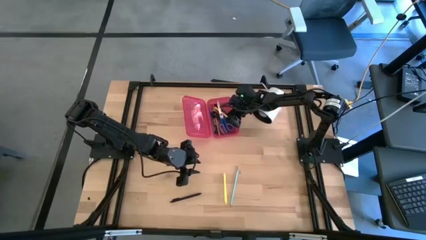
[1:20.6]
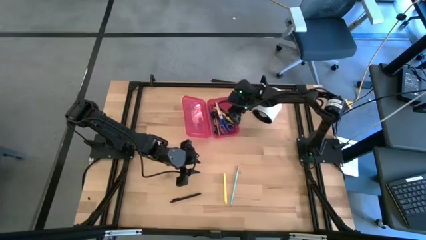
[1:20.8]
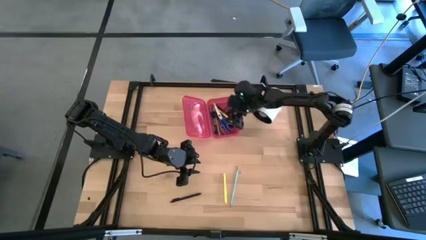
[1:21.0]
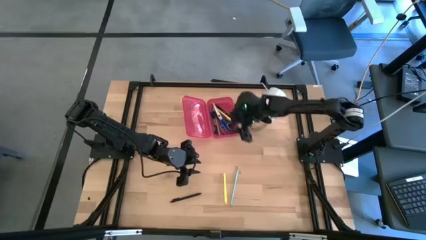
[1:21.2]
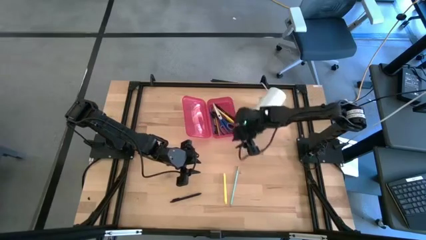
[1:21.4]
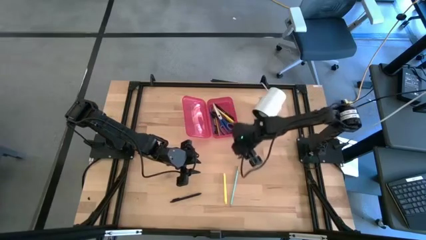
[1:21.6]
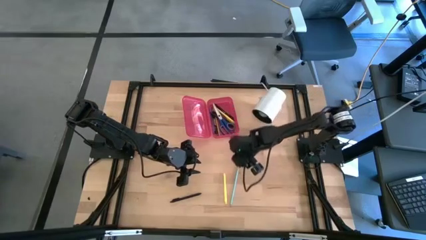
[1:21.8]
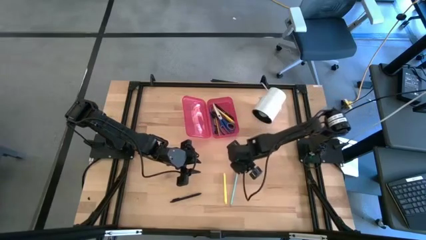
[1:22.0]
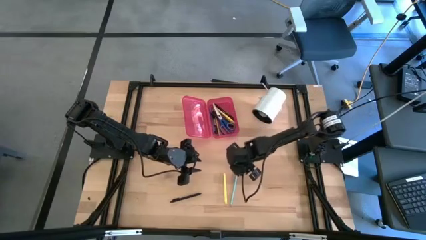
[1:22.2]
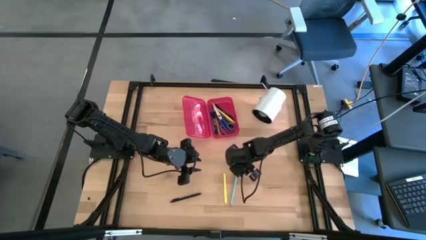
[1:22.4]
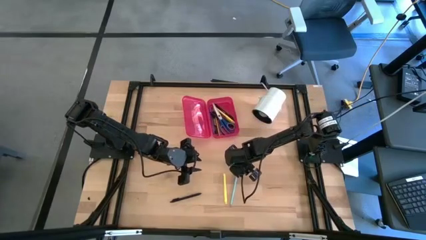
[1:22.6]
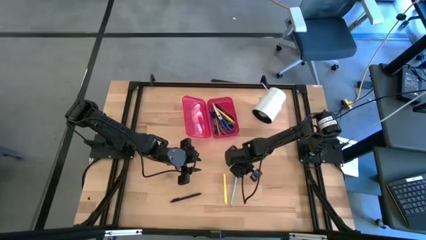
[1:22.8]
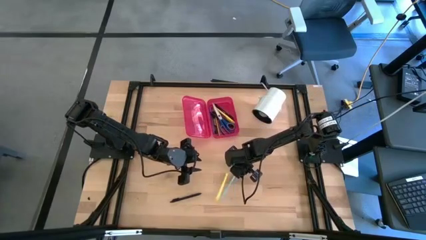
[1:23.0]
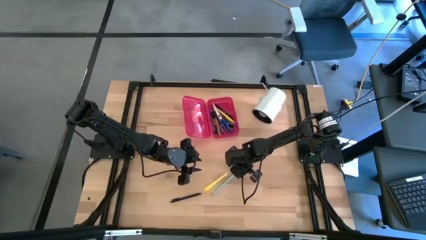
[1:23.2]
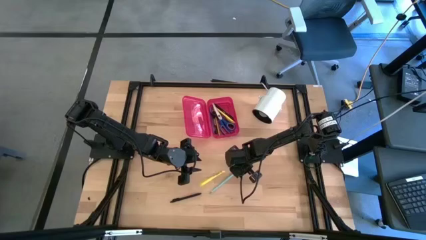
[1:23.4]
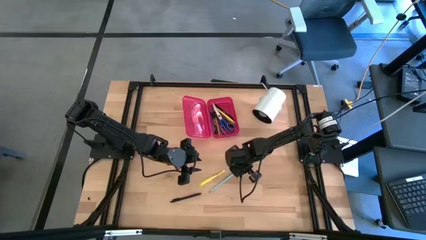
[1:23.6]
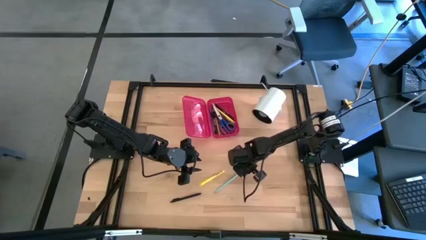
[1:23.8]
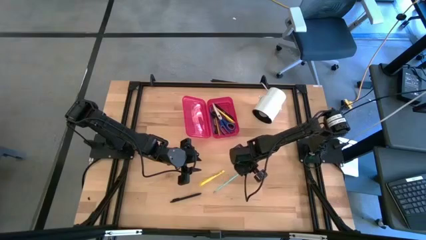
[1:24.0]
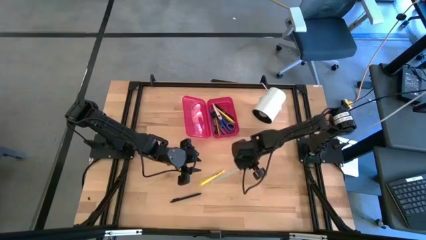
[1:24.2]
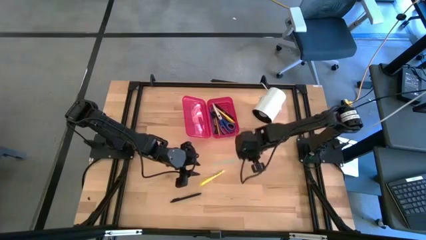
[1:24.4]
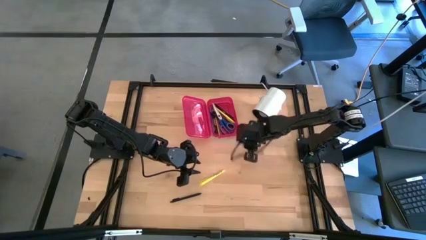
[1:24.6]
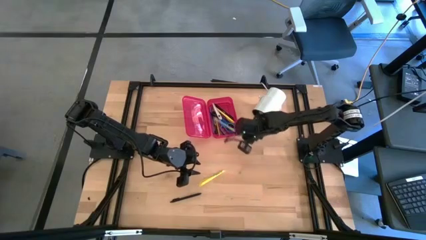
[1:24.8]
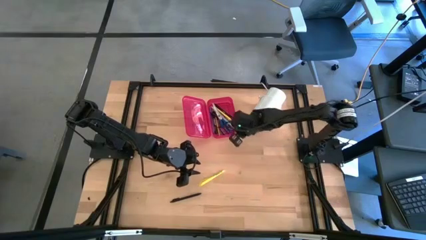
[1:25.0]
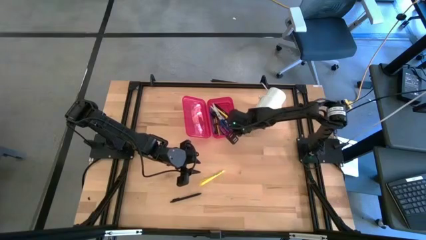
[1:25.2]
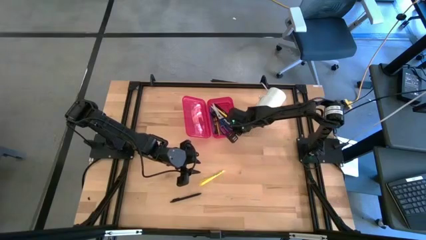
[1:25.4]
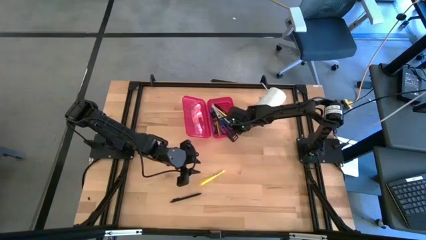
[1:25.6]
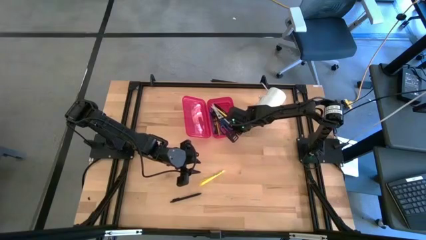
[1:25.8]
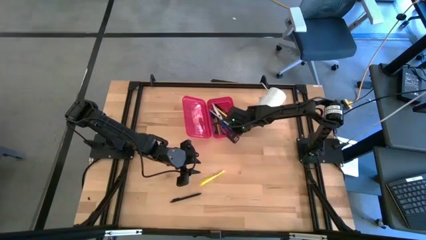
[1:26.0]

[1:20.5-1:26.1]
Task: Pick & place school supplies into a supply box
Put the blue pencil into the red supply box

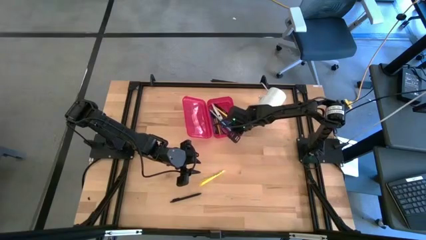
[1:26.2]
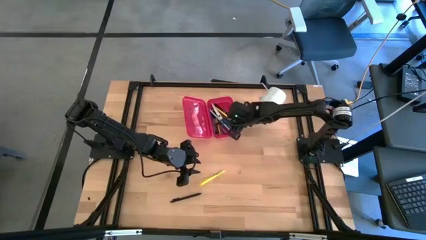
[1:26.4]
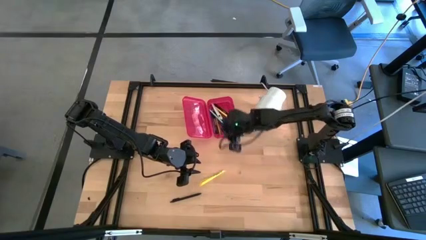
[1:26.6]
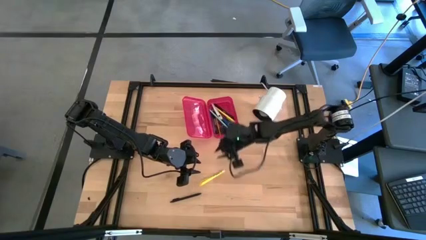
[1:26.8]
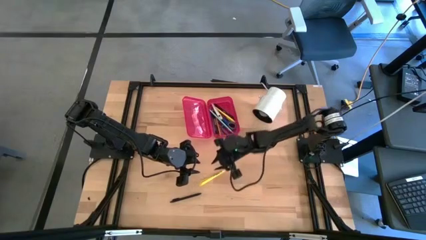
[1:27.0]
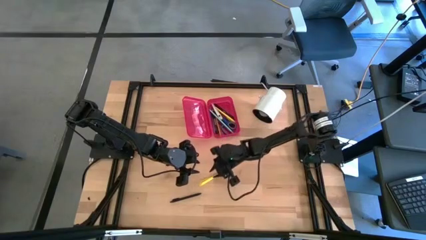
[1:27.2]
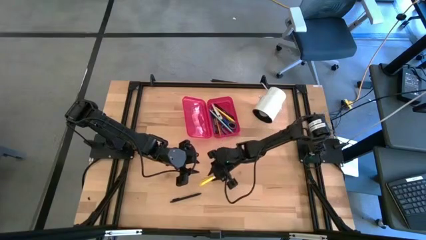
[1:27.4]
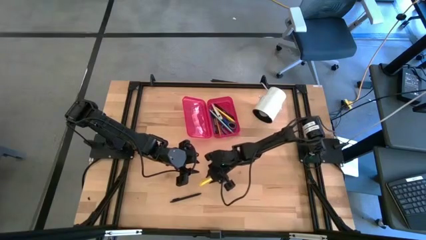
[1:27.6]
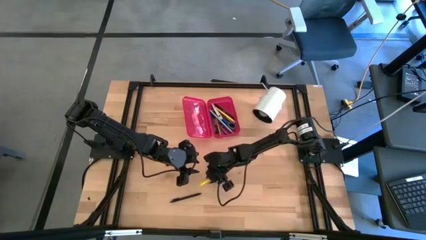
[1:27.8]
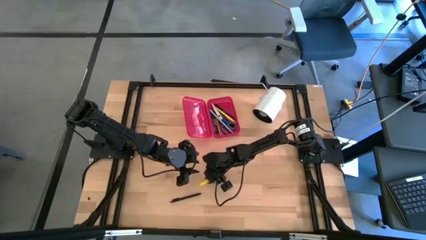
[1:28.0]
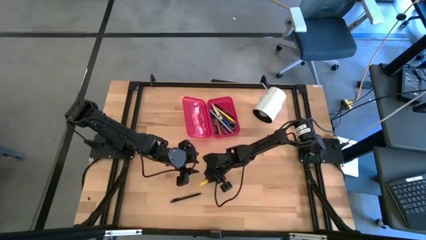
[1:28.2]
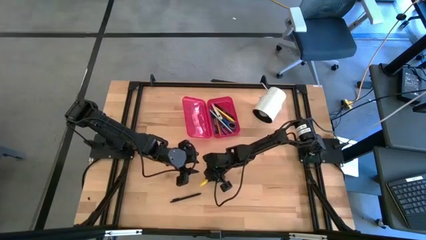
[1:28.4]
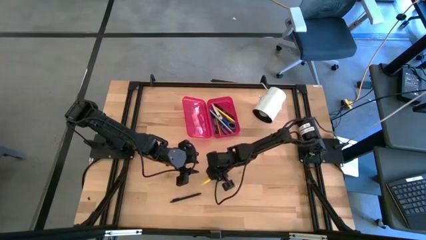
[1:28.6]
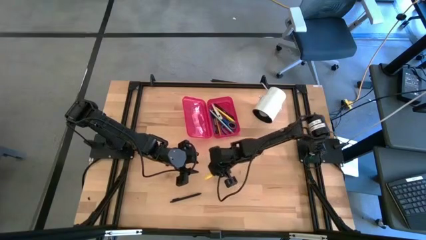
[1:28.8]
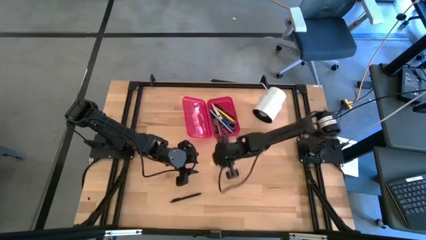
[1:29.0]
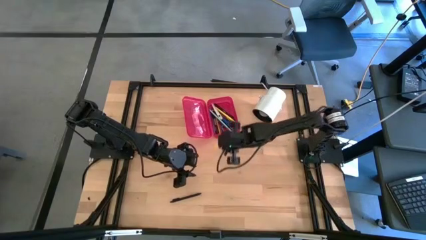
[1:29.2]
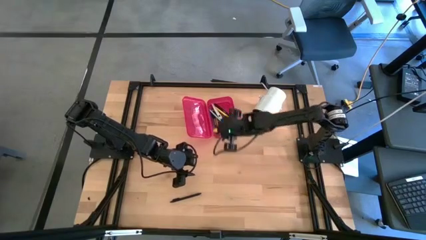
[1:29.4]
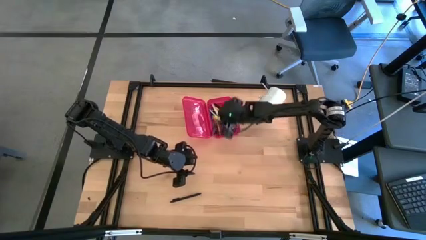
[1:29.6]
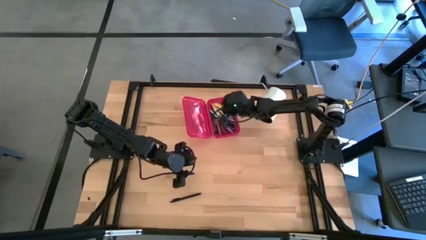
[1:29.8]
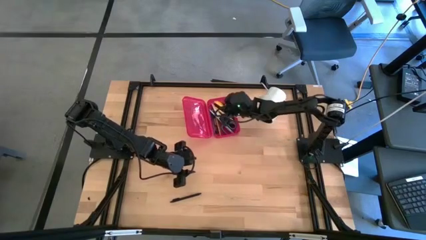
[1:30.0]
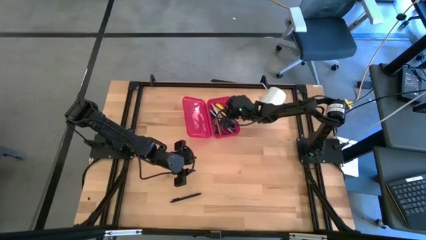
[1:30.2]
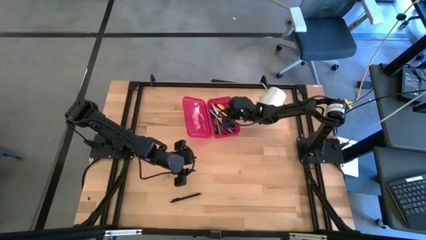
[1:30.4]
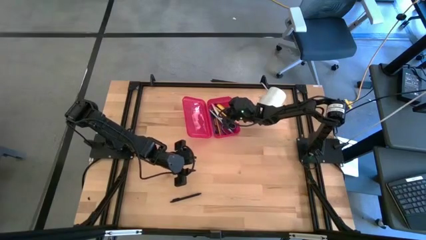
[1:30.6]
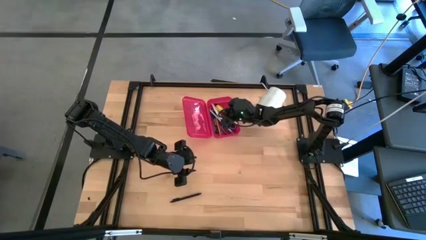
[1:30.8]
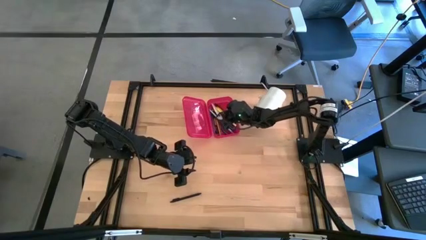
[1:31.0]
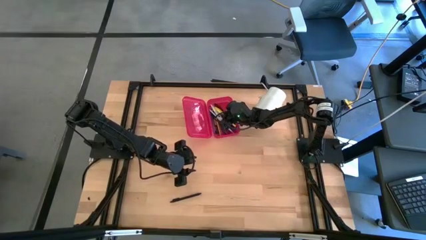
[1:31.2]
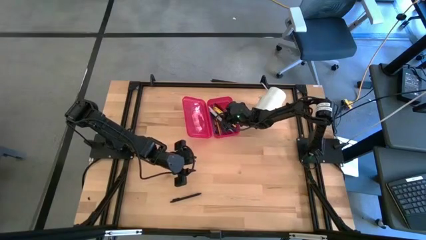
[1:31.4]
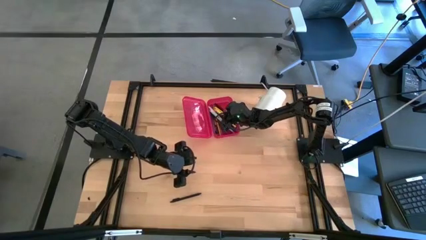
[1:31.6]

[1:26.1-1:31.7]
Put the yellow pen into the red supply box

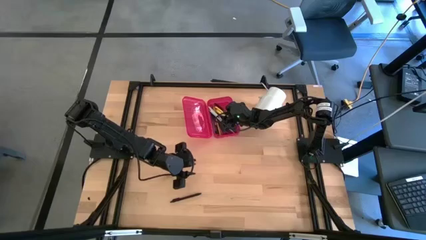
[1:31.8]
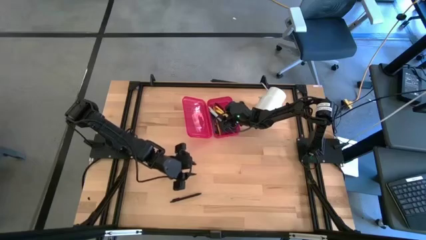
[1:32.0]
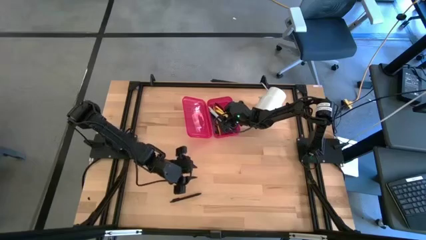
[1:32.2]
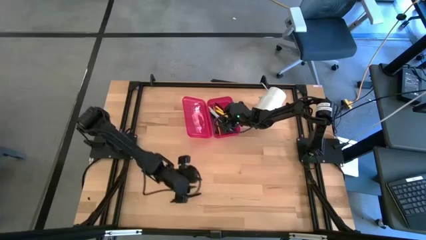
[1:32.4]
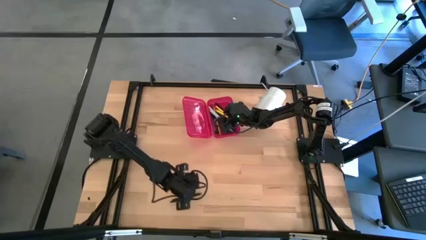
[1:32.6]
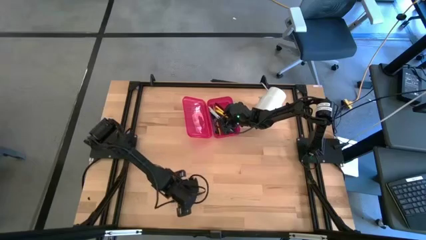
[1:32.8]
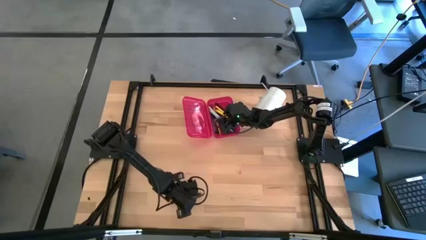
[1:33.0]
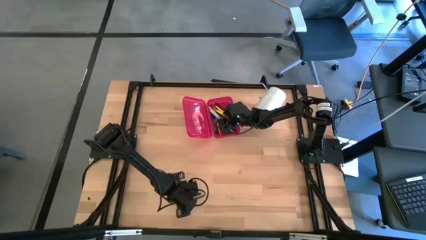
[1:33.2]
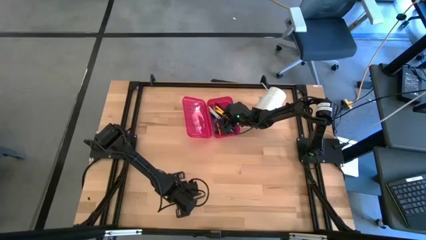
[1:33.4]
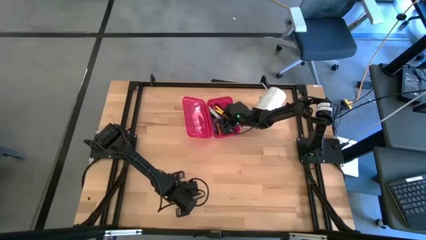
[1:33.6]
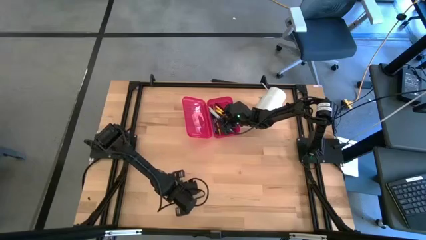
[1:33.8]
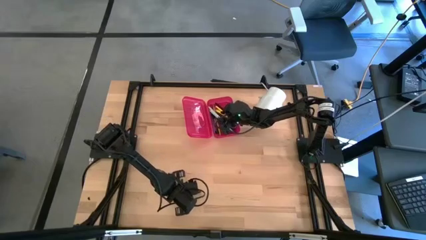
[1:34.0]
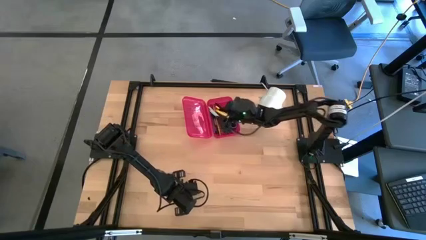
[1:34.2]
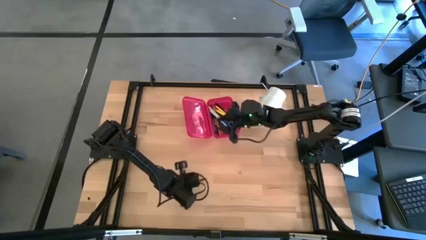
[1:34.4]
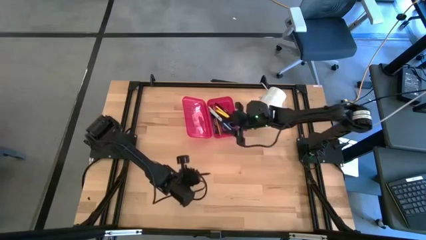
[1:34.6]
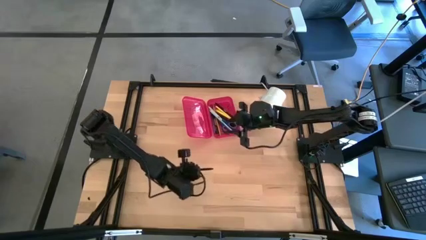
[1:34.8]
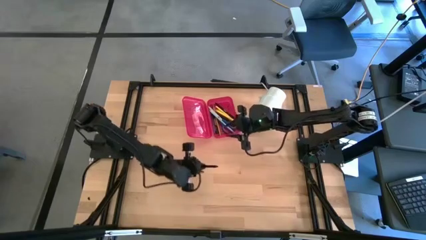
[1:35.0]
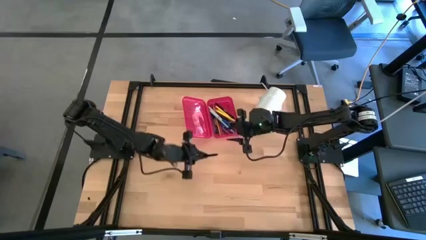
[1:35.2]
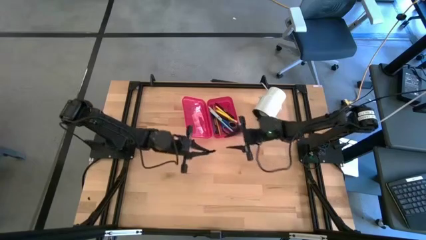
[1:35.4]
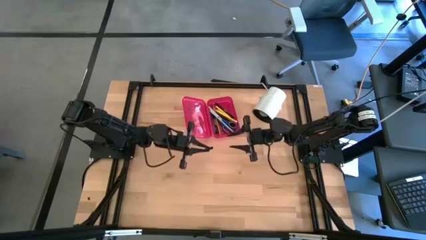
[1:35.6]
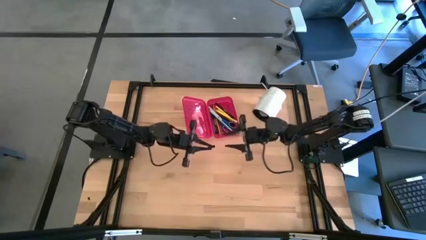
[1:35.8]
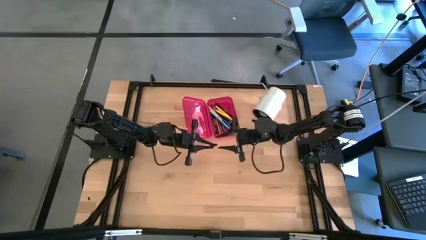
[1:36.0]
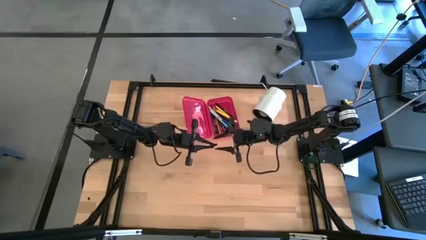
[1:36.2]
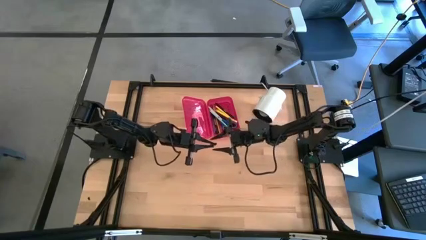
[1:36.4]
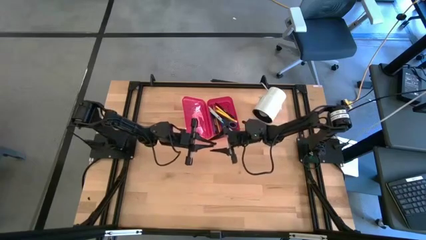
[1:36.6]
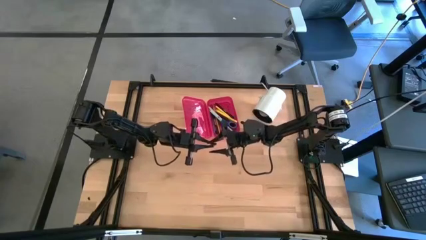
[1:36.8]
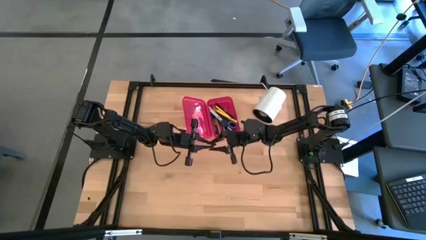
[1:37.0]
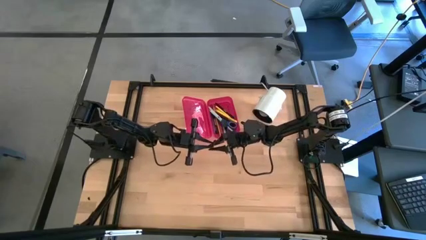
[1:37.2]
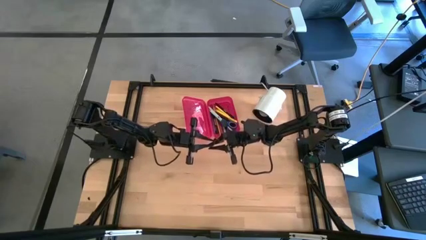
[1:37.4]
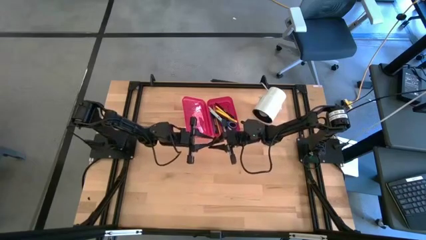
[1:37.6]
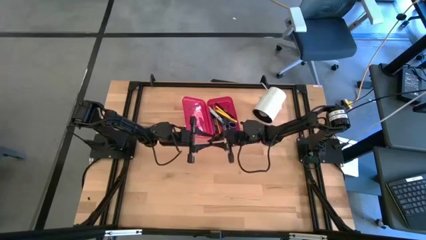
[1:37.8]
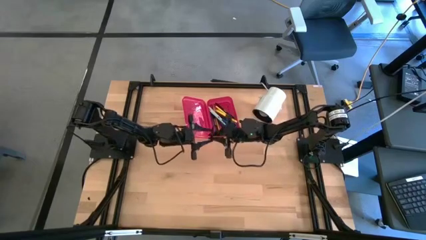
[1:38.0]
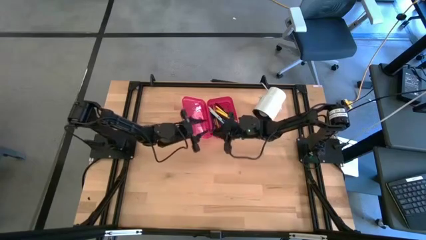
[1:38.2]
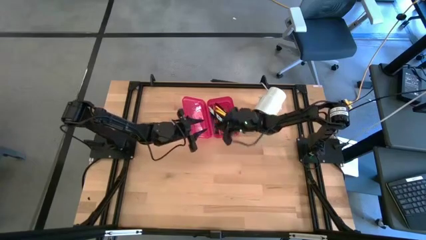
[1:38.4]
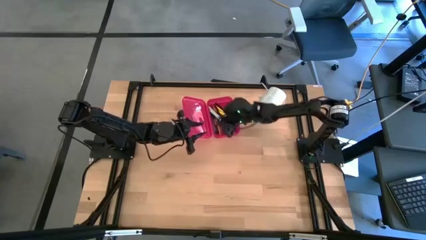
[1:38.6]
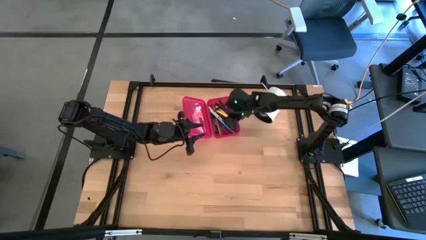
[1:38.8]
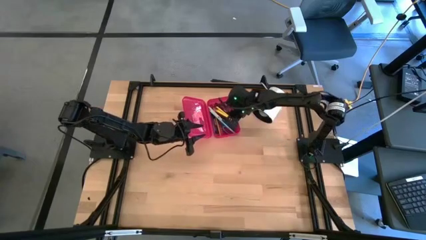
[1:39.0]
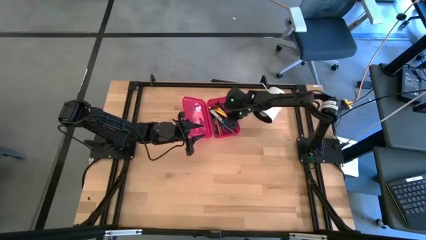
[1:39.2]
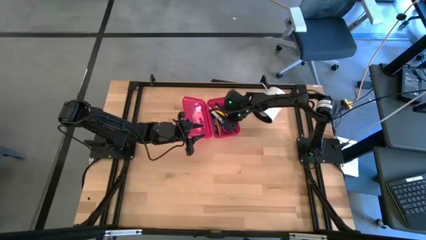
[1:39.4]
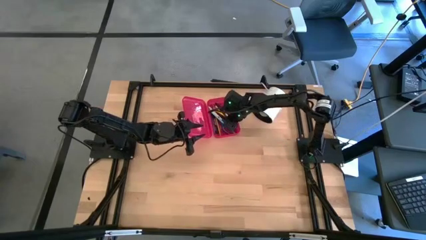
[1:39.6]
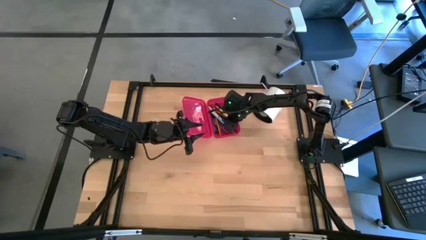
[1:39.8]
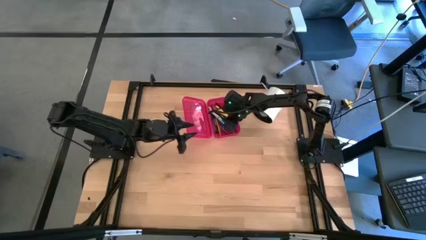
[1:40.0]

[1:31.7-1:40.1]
Put the black pen into the red supply box
